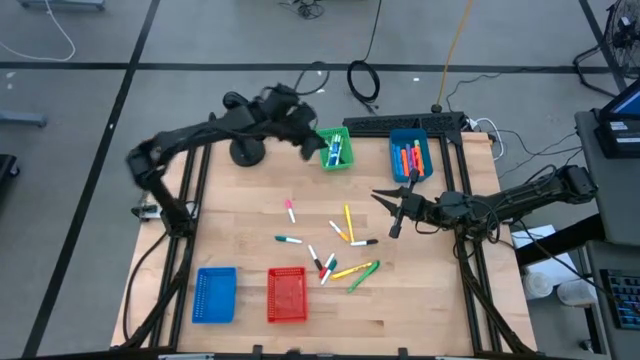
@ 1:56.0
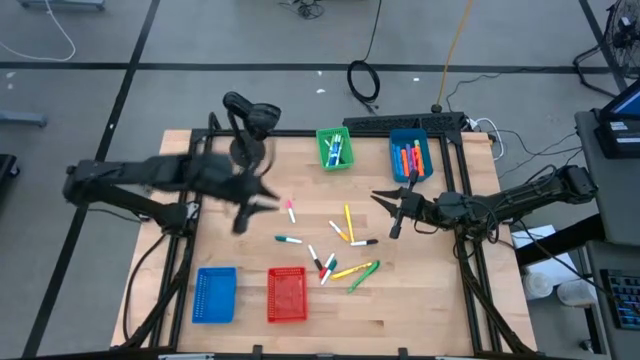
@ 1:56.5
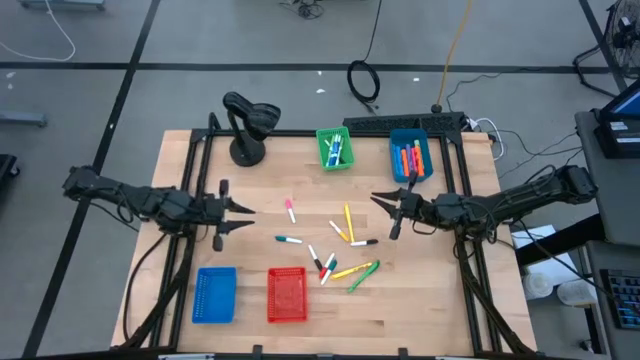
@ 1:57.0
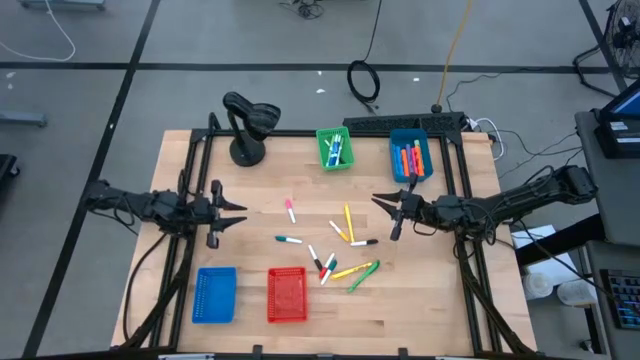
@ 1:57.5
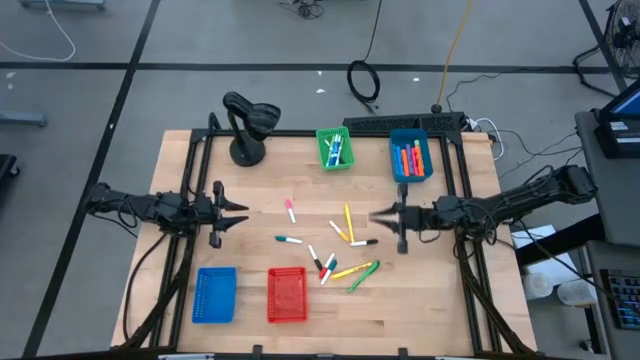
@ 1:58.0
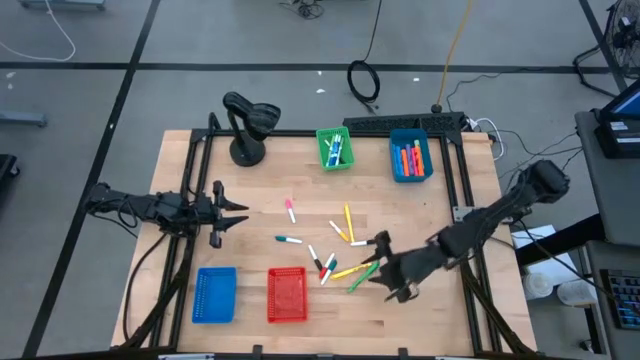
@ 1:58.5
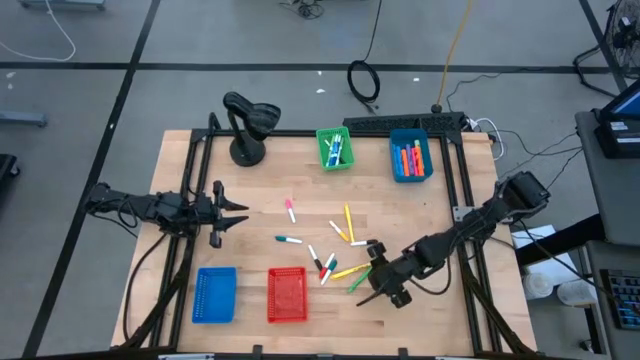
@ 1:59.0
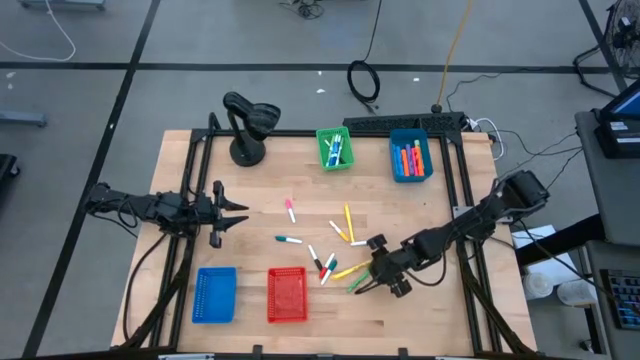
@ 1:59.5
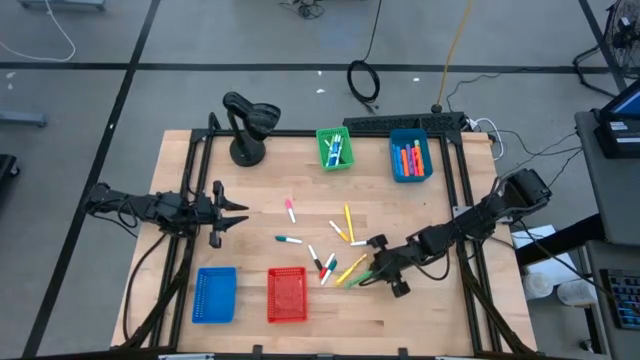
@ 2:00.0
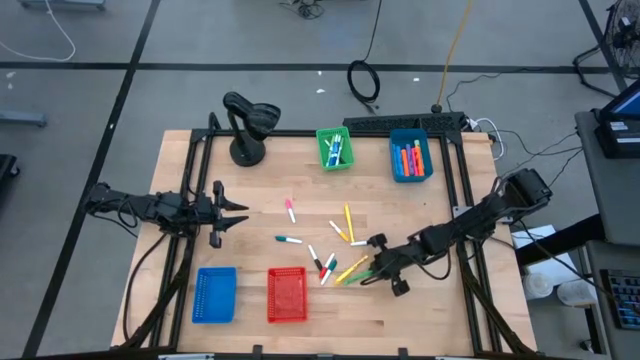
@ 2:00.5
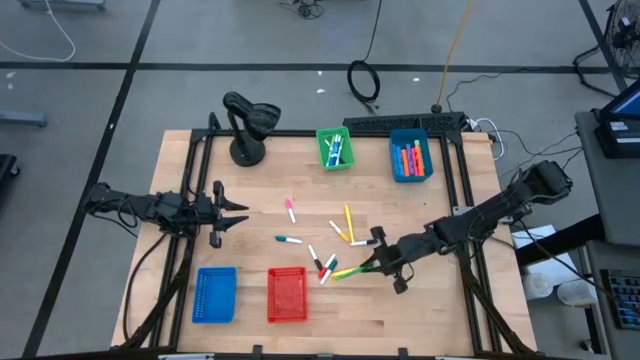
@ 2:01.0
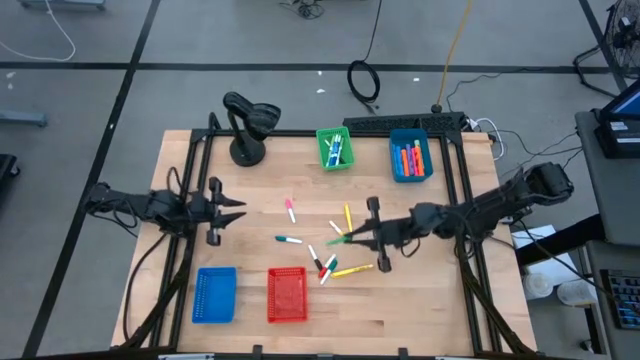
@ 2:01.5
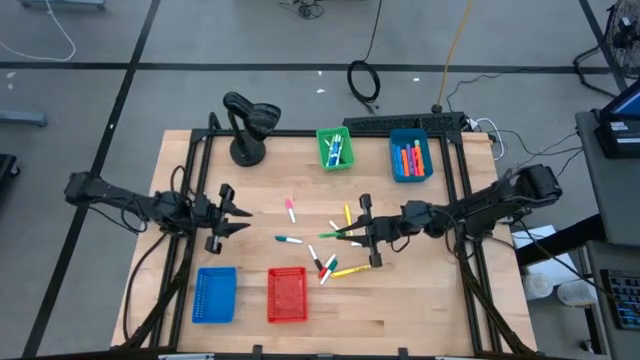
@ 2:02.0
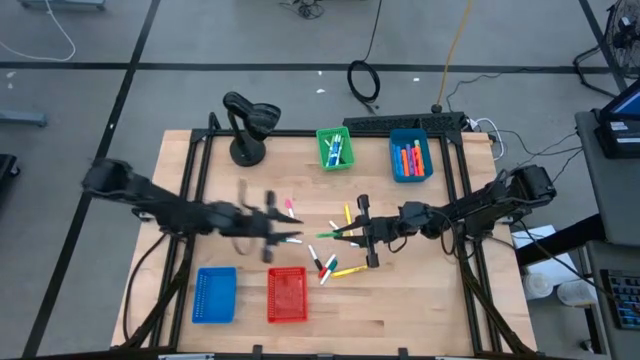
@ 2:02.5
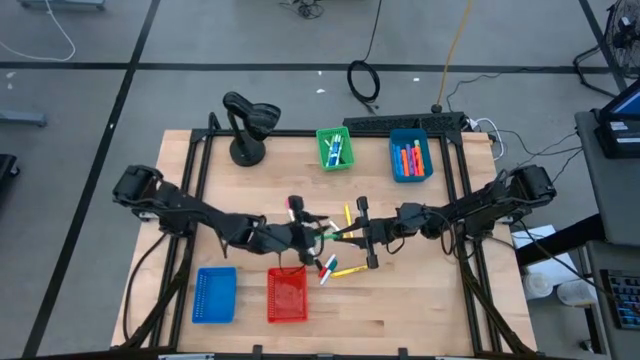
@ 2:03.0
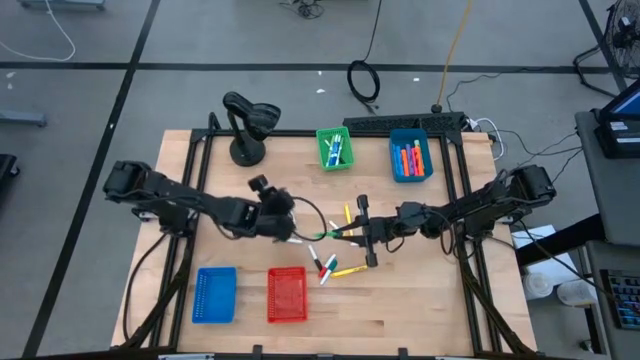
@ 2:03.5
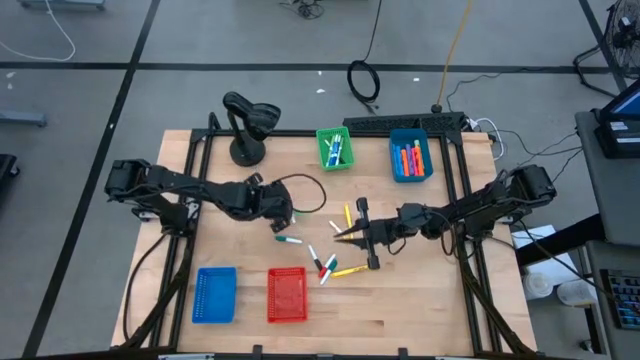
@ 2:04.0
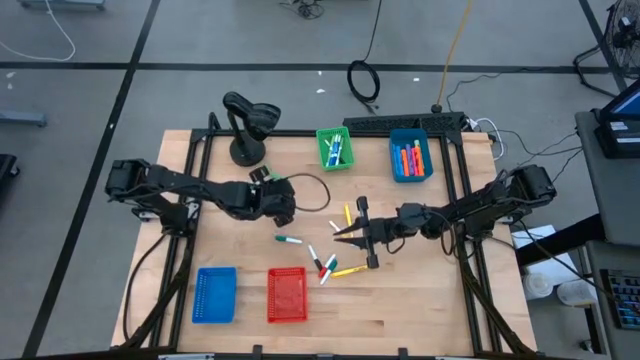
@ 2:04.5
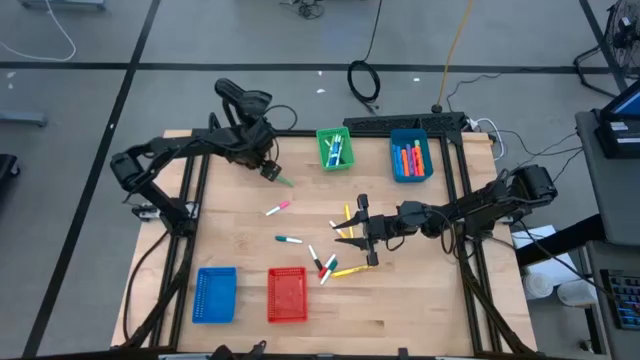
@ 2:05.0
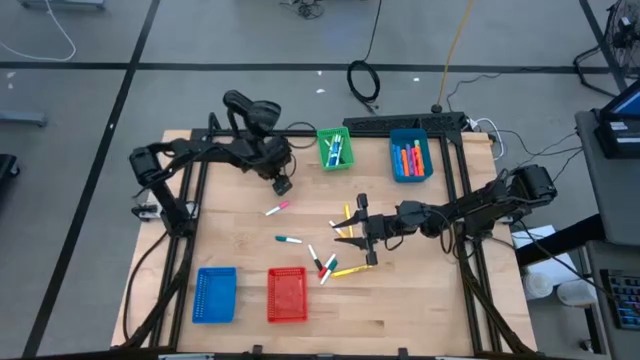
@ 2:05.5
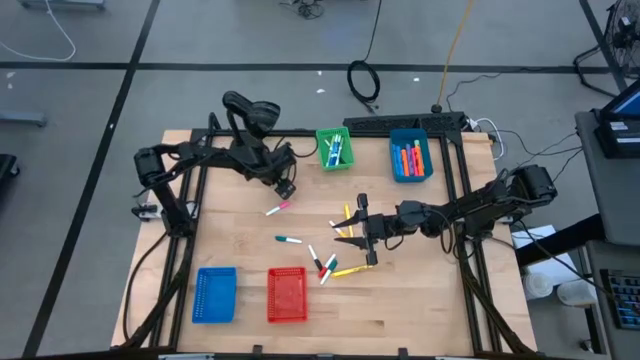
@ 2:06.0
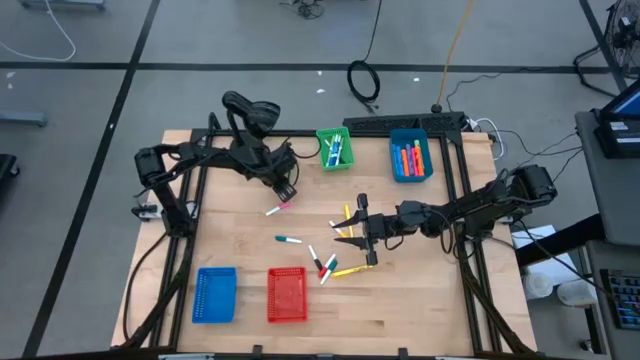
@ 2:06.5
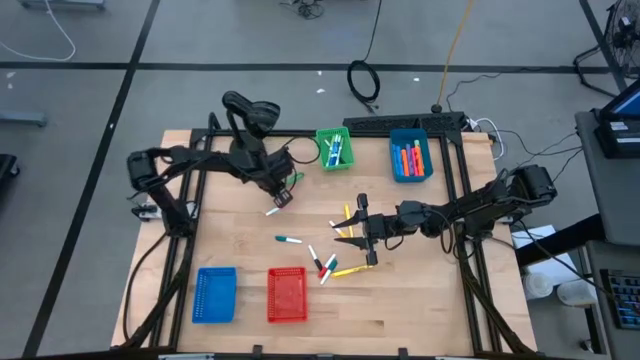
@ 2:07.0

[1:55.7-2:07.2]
Task: Pick & Place Markers
Put the green highlighter pen into the blue bin

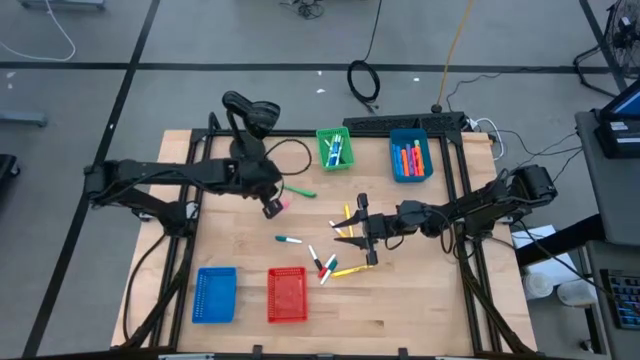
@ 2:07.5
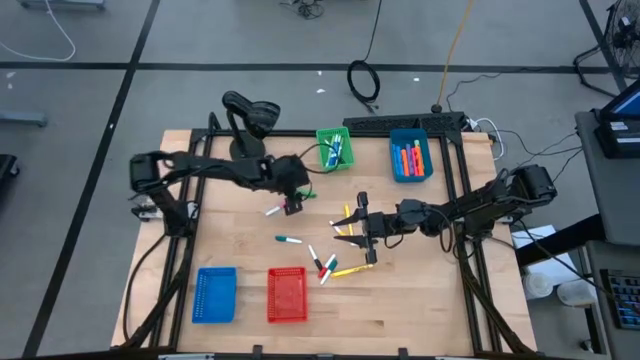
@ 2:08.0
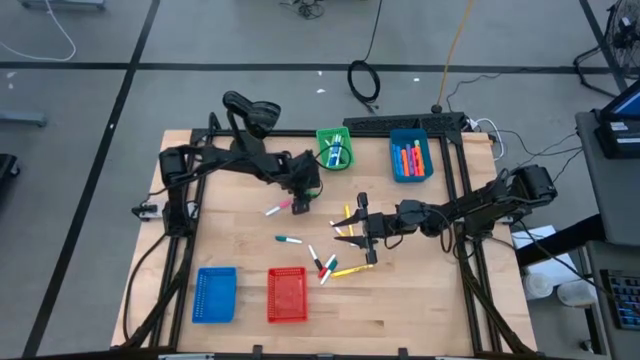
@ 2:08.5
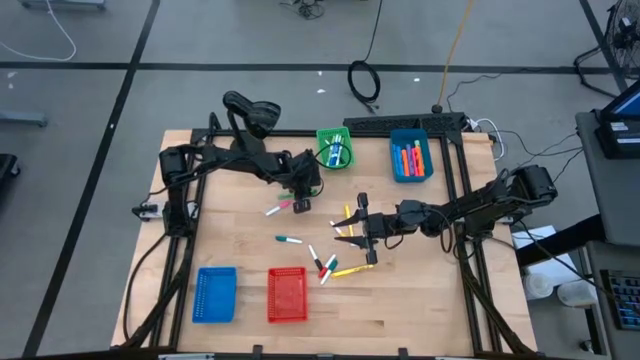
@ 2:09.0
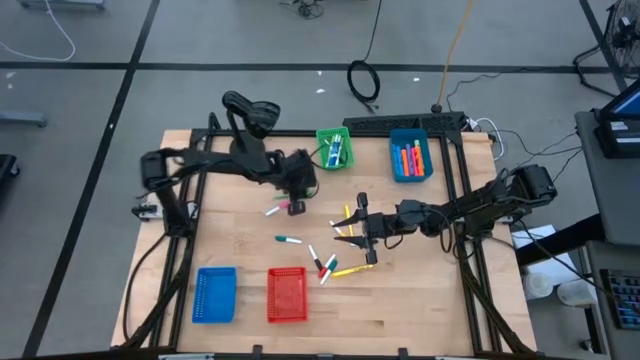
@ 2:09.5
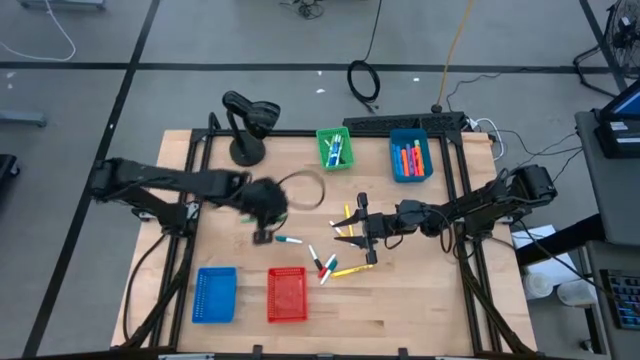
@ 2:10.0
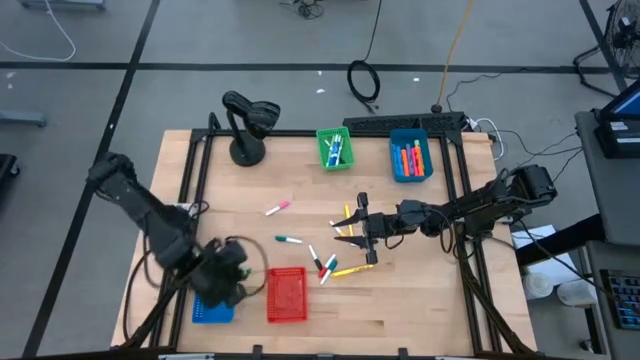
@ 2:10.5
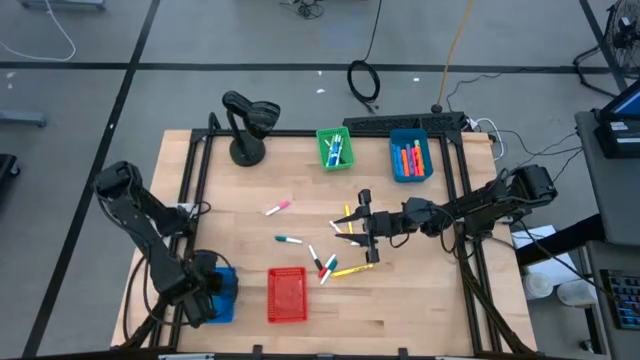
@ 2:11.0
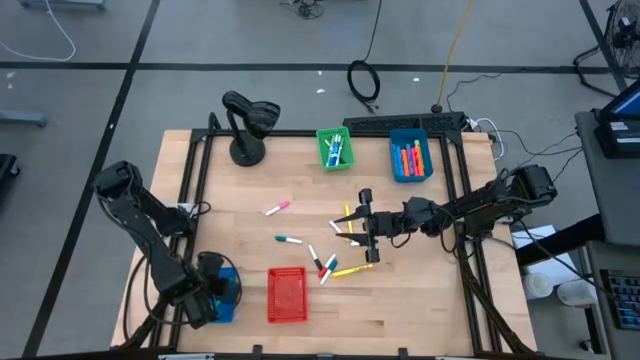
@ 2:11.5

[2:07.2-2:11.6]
Put the green highlighter pen into the blue bin

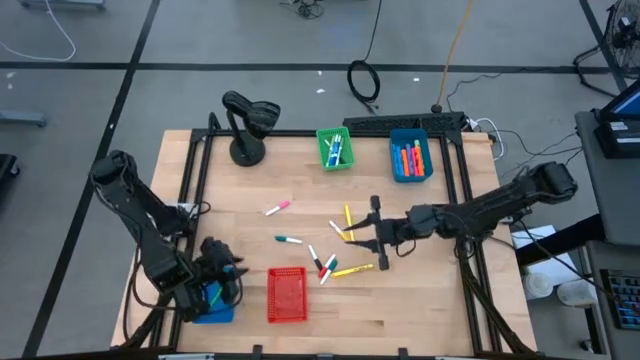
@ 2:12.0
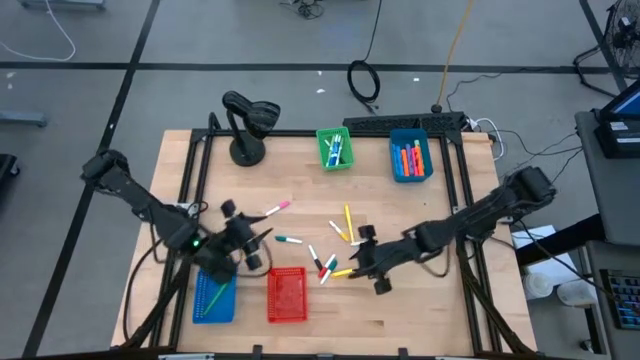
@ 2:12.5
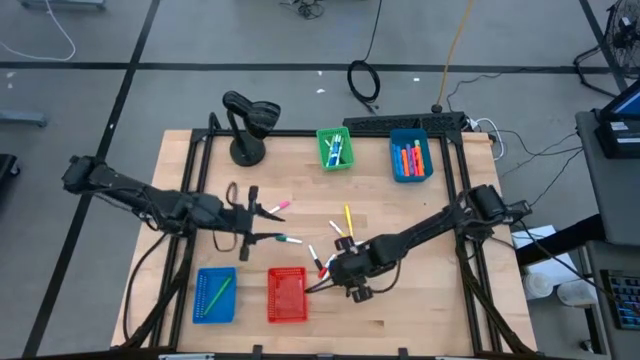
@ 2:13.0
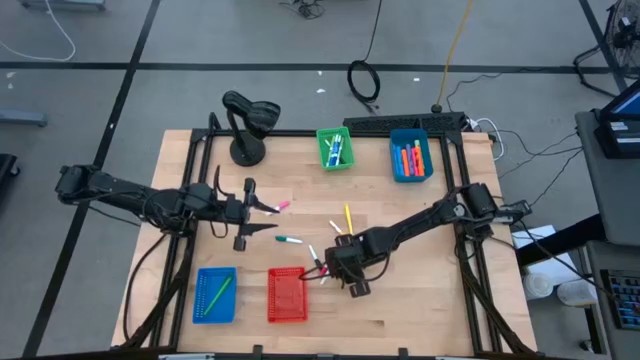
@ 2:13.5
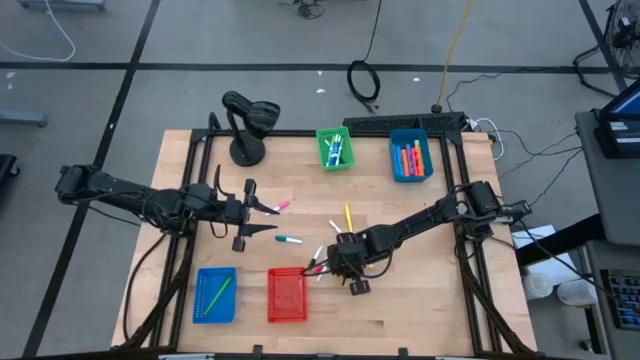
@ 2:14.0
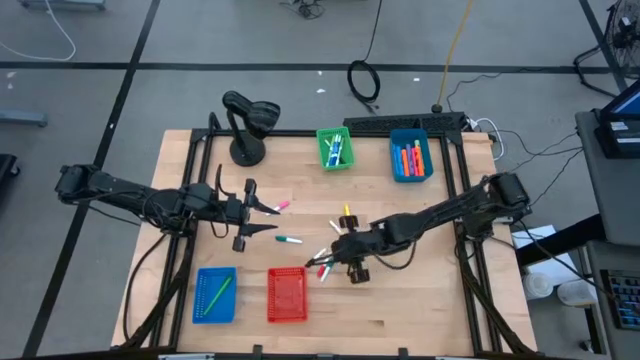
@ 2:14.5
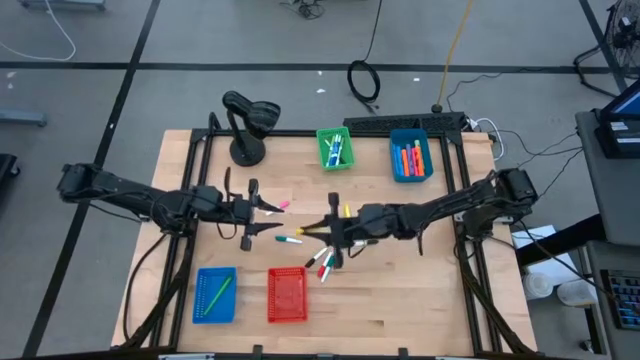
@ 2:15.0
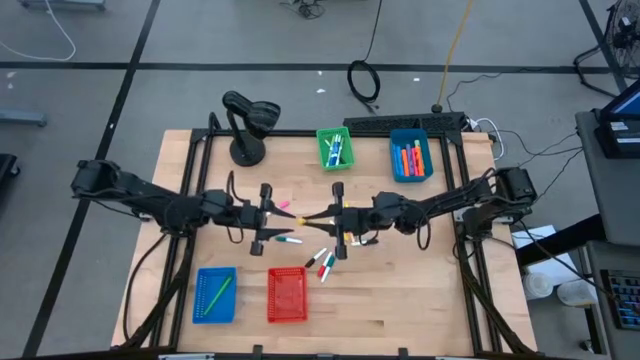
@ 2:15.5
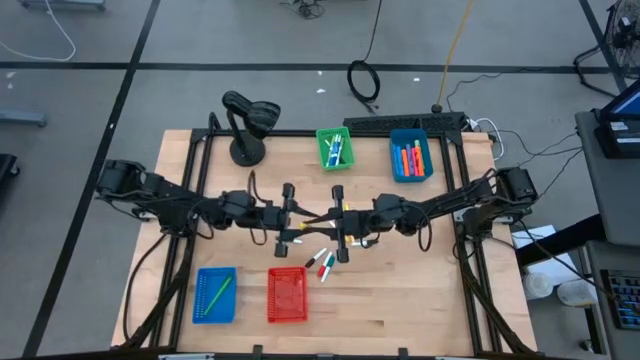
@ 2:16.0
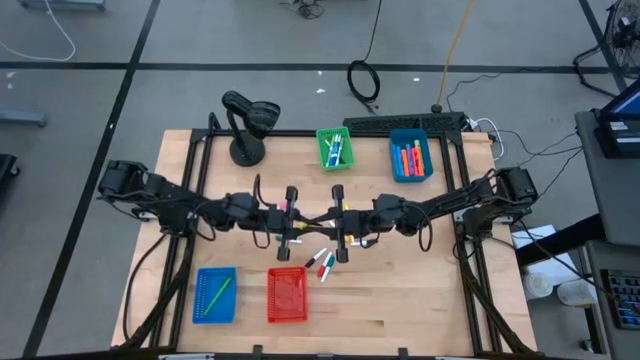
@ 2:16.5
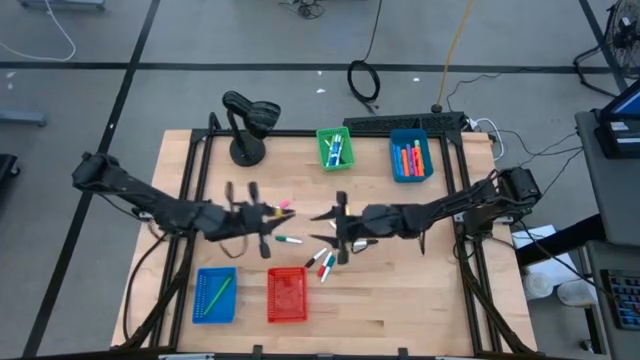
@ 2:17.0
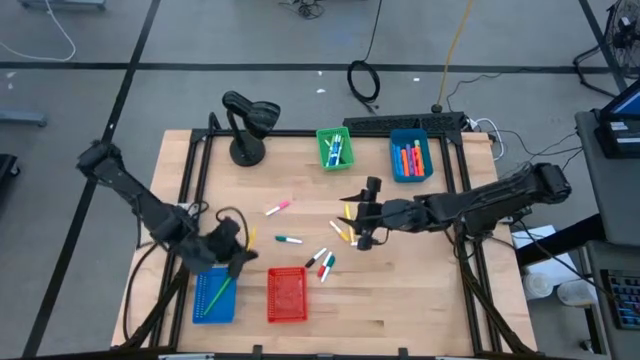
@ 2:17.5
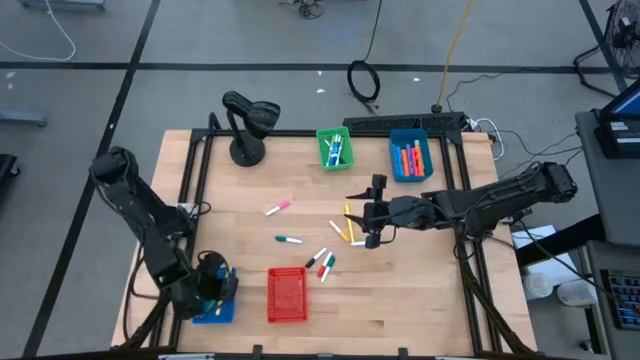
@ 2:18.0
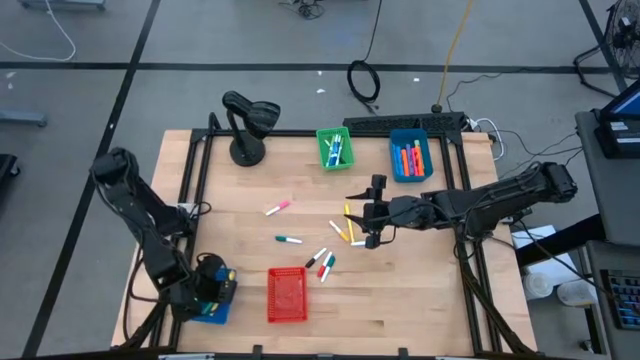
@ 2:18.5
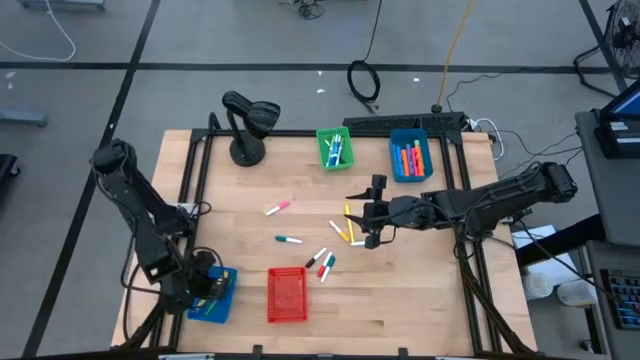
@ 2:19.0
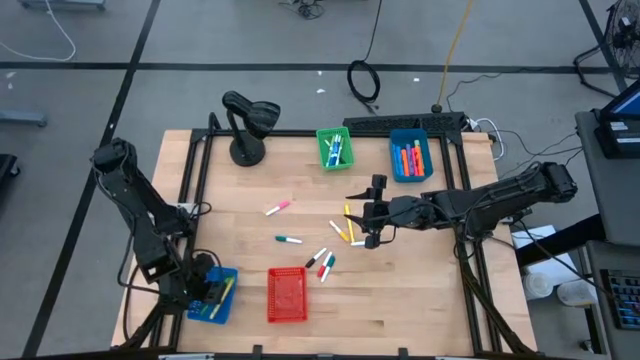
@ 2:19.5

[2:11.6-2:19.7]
Put the bottom yellow highlighter pen into the blue bin
